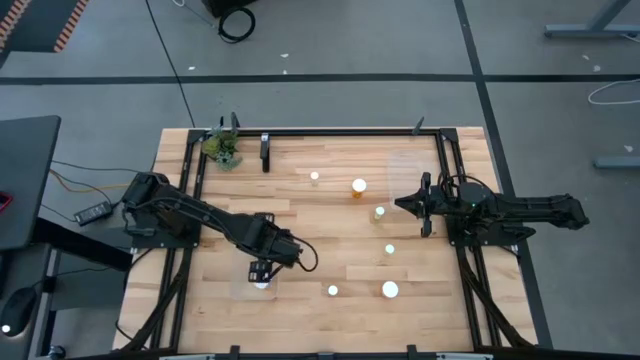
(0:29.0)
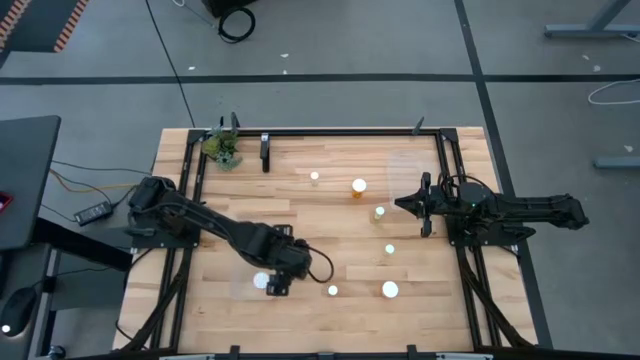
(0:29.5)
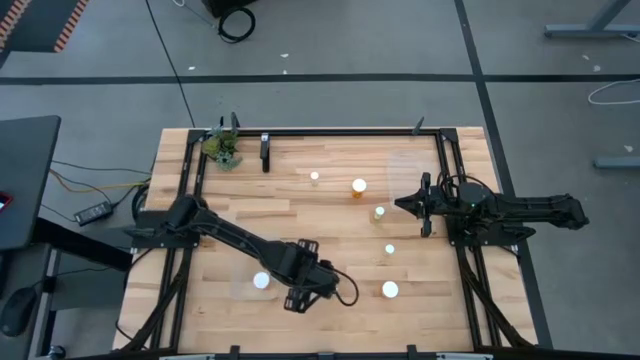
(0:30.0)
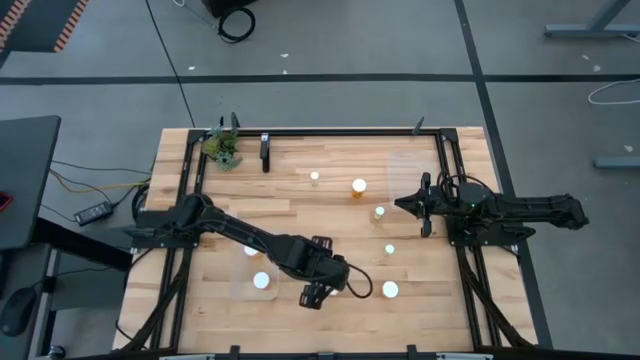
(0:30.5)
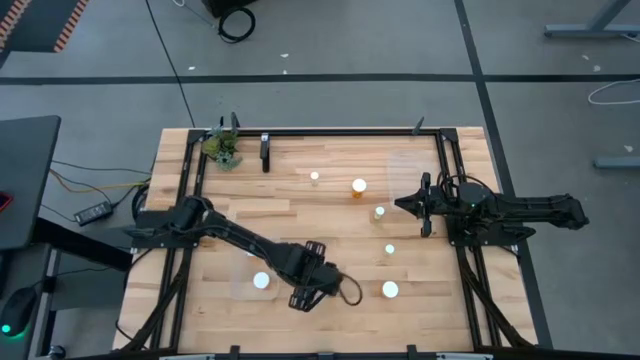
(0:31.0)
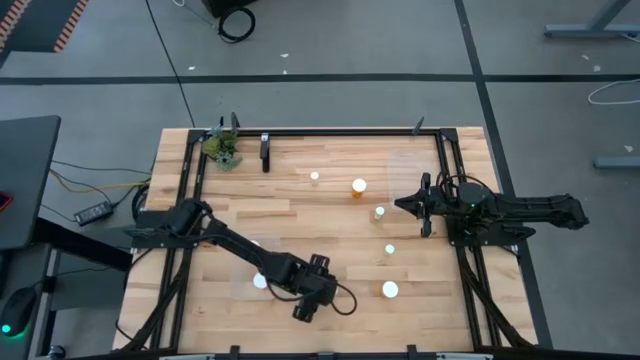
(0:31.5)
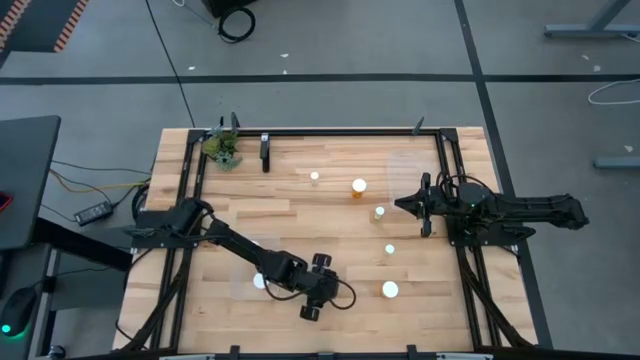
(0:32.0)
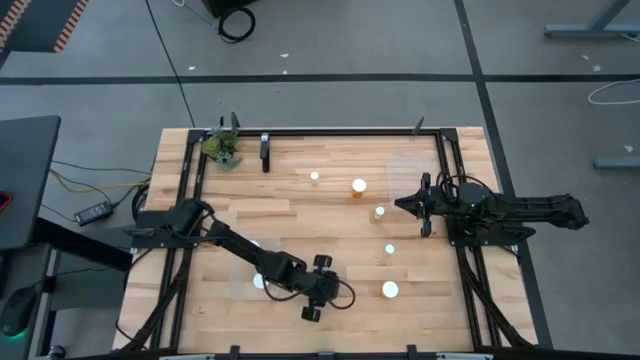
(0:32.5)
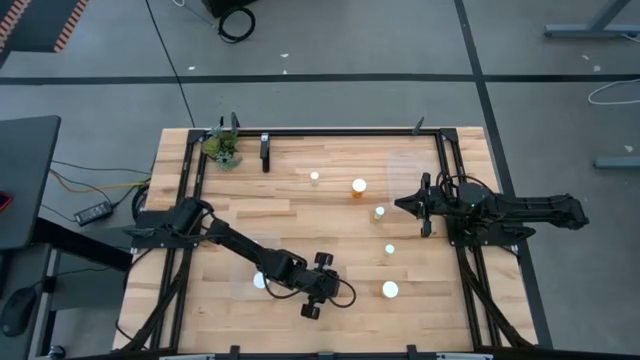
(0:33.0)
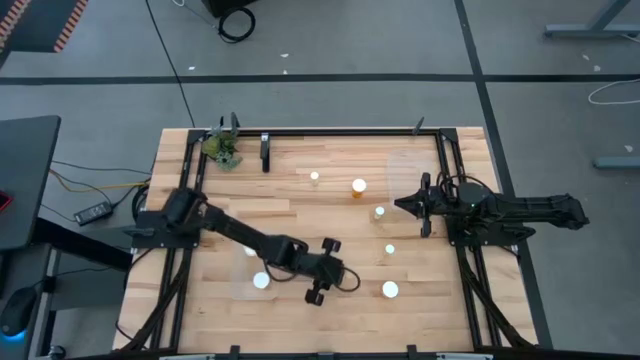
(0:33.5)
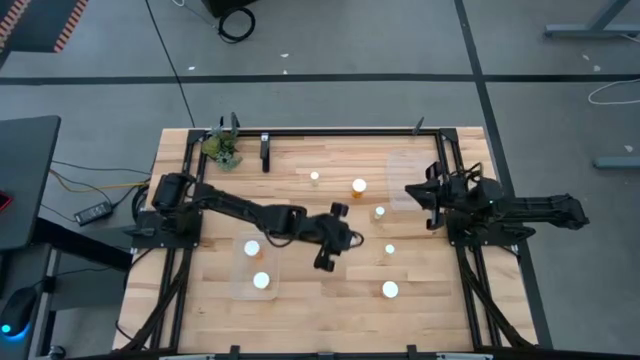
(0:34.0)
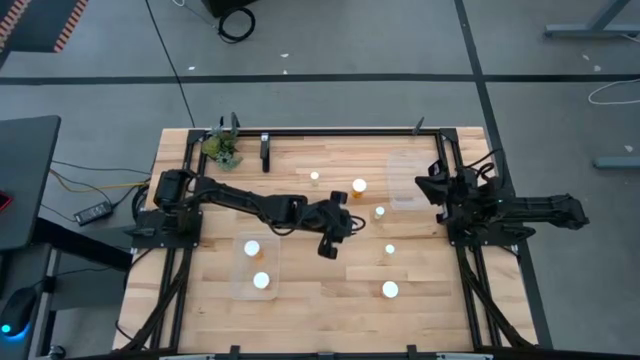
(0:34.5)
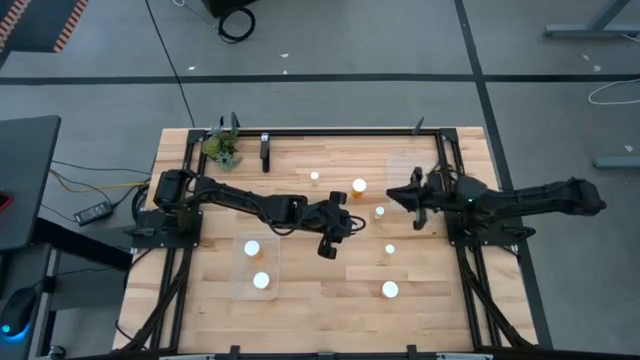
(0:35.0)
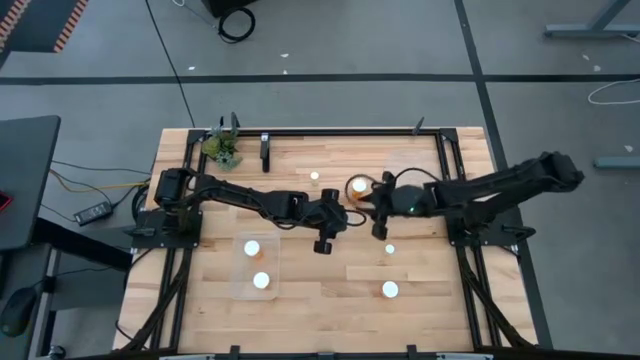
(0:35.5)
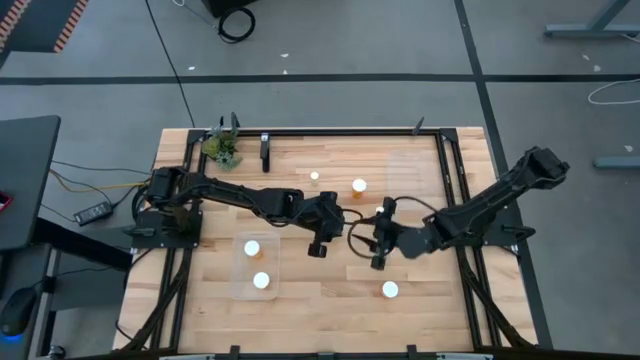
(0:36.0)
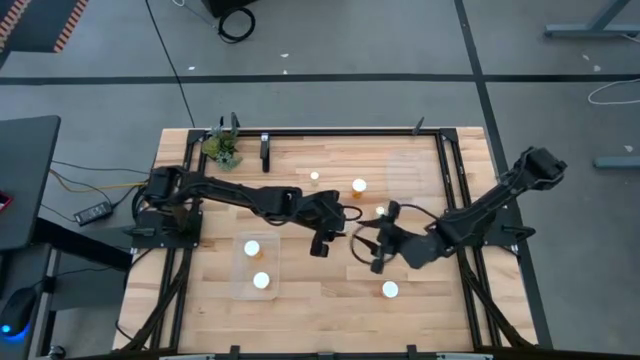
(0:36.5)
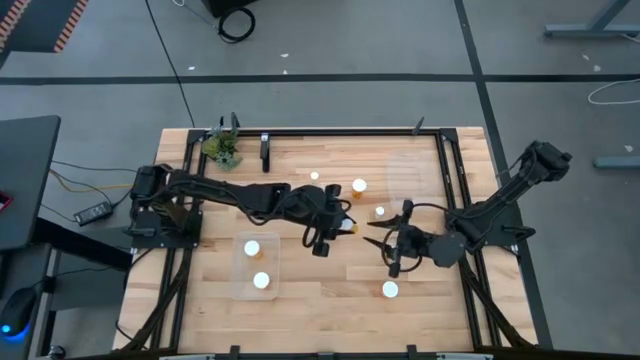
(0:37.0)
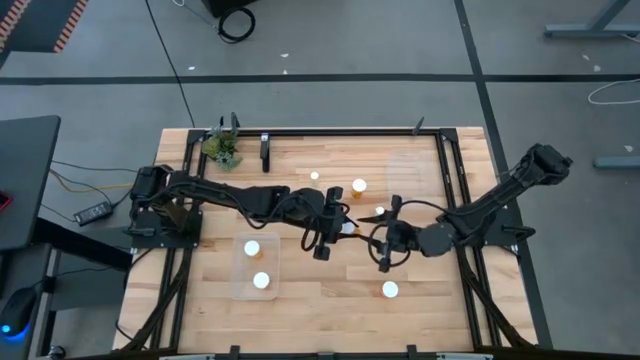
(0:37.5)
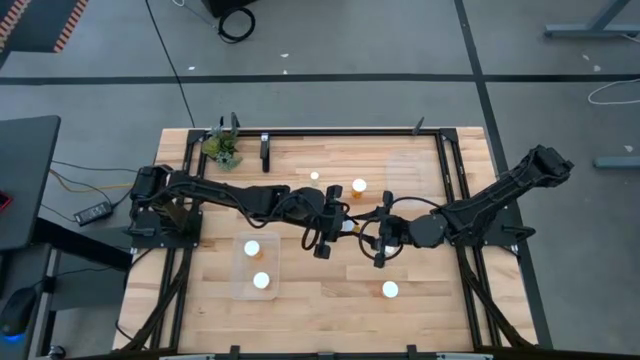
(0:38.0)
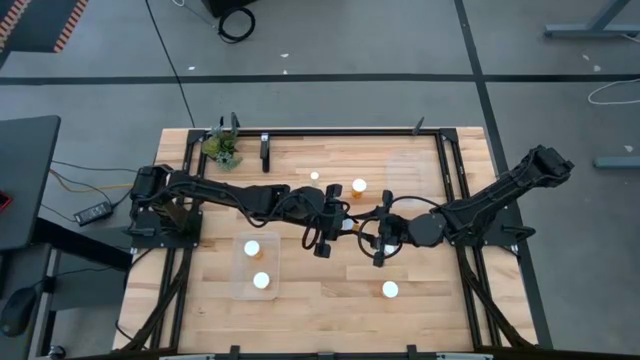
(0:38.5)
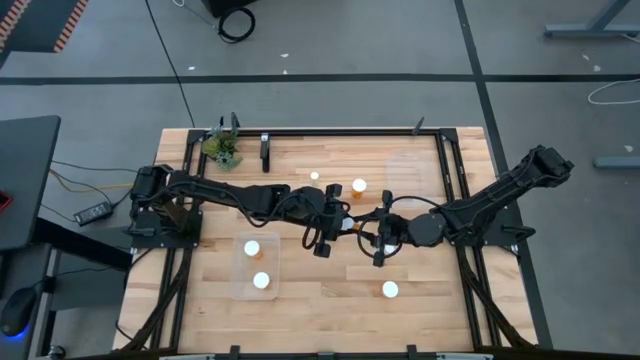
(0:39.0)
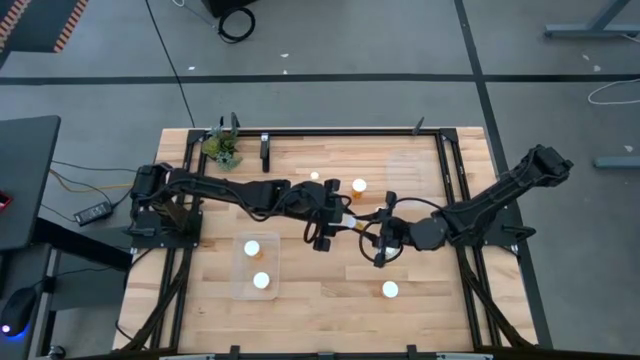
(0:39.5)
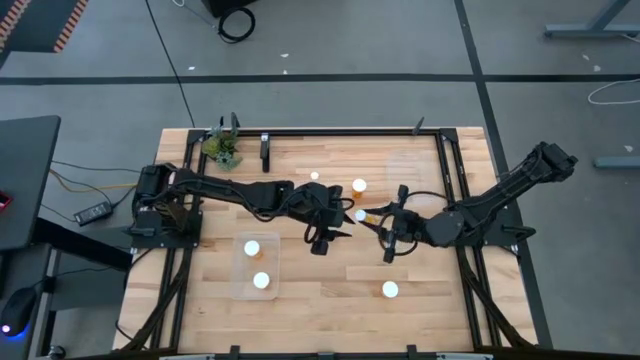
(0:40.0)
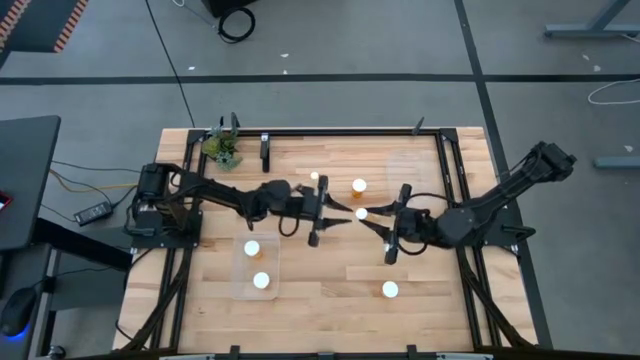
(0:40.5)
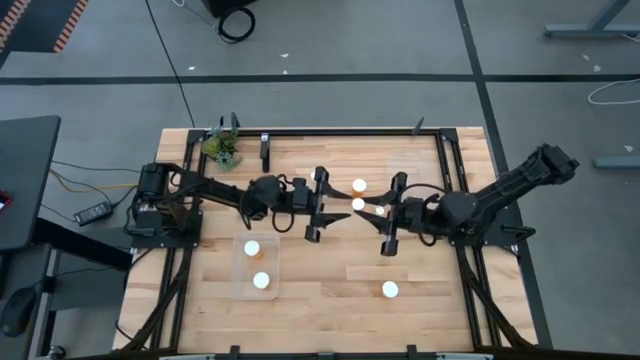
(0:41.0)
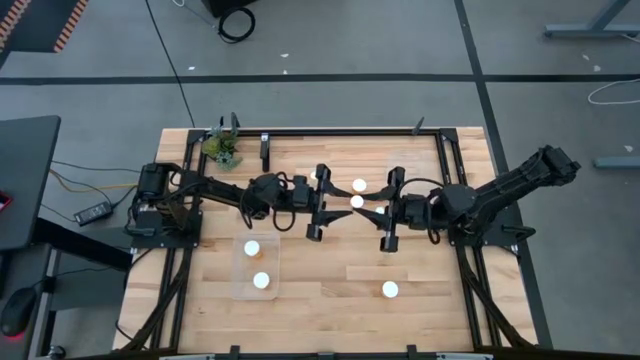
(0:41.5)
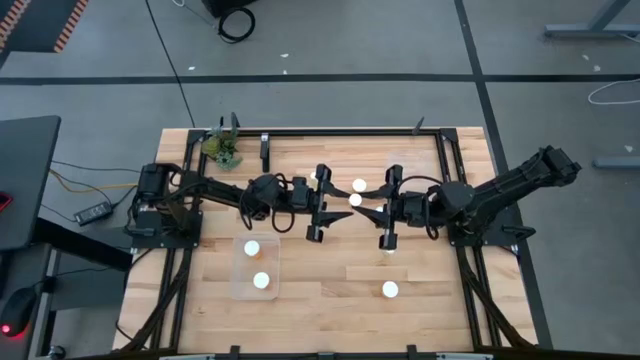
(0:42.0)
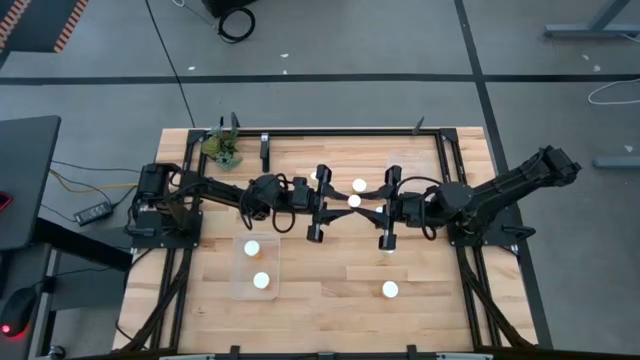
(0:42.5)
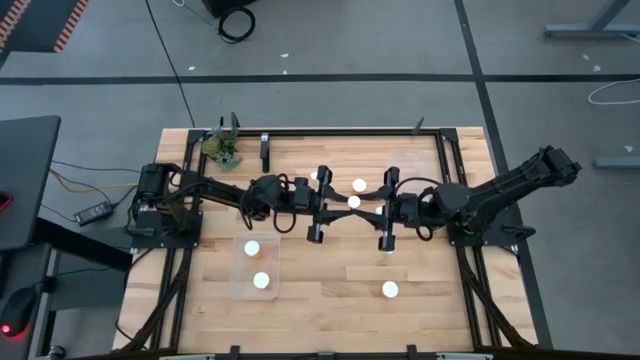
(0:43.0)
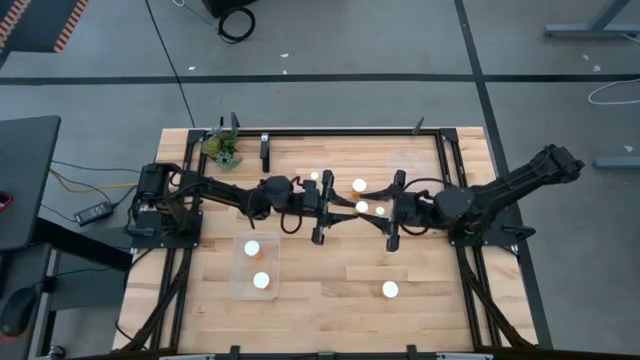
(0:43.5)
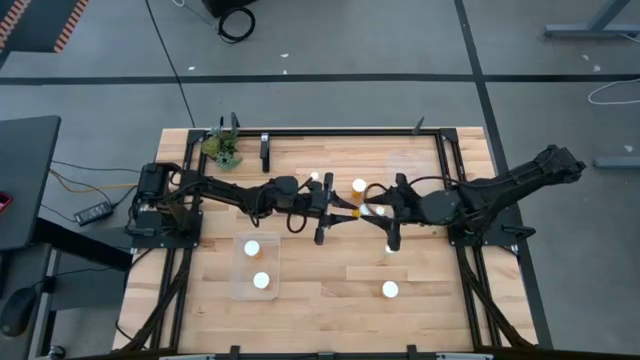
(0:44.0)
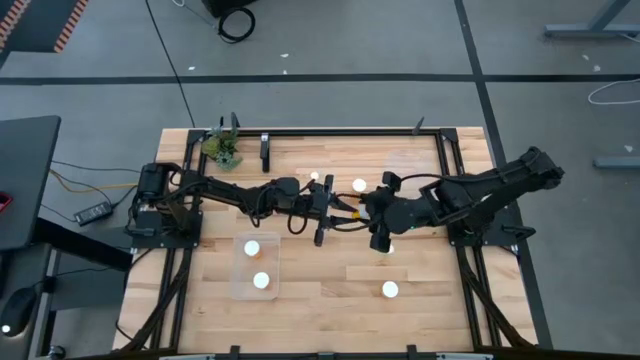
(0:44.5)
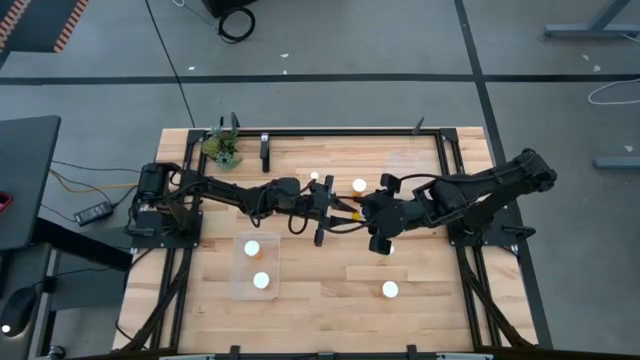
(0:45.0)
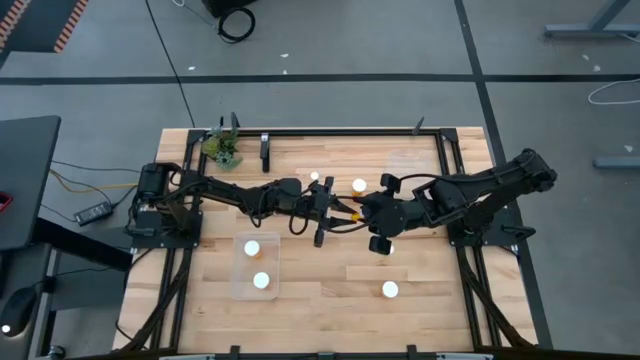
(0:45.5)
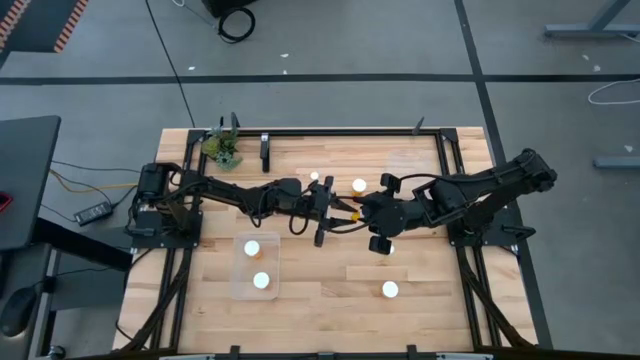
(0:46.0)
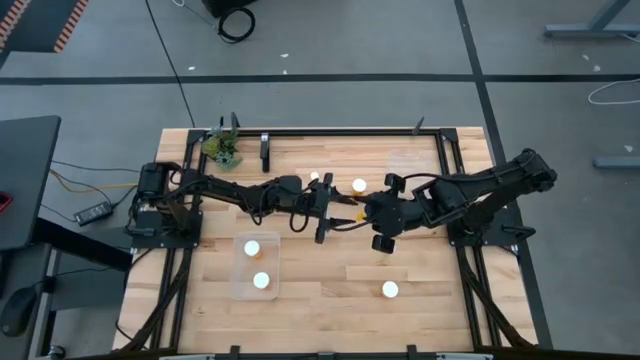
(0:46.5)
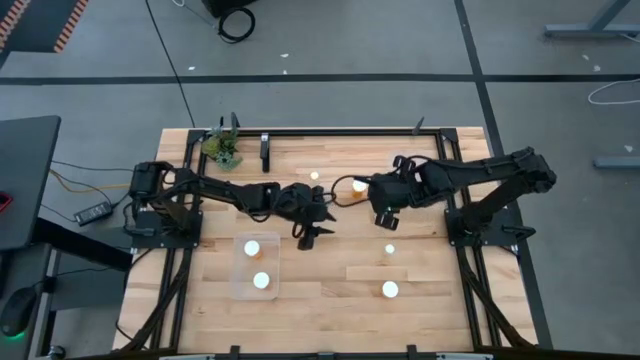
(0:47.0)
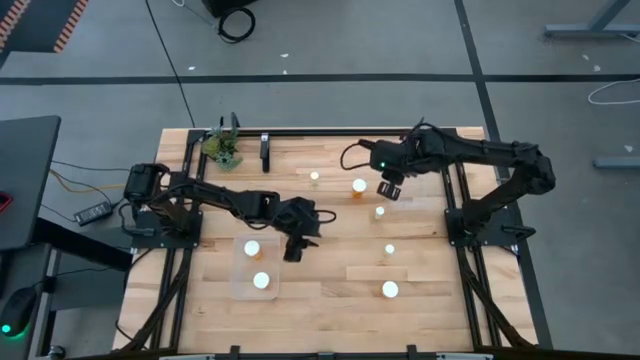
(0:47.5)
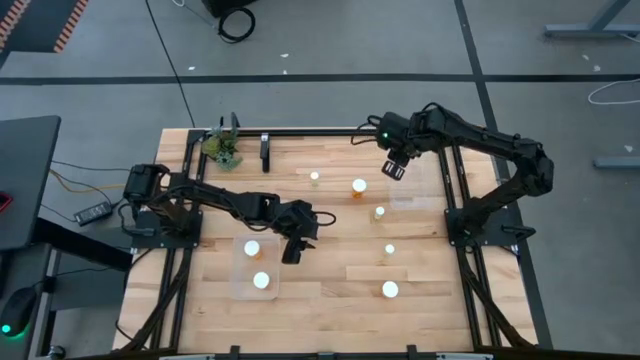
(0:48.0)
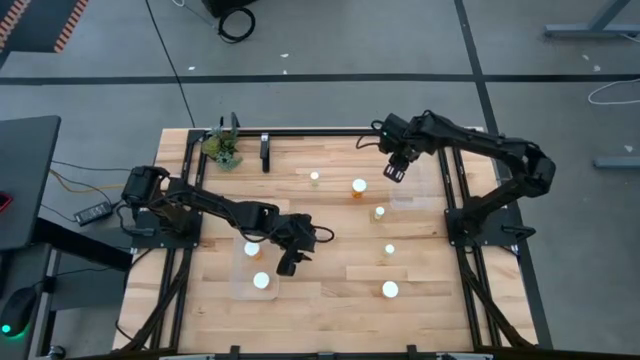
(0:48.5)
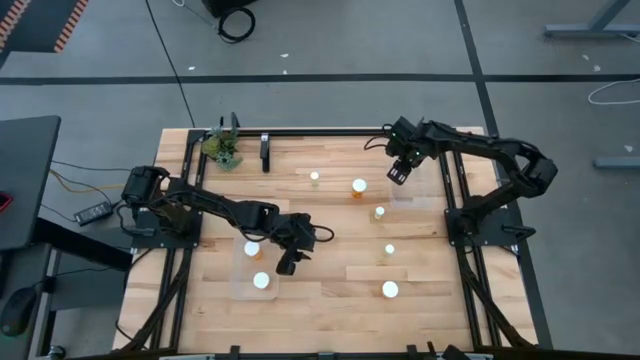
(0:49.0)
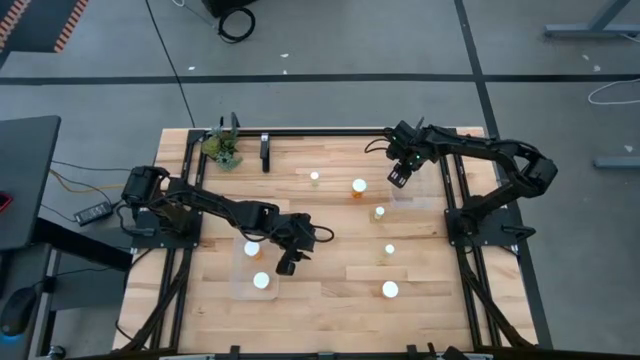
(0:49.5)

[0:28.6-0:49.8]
Task: Pick and place medicine bottles into bin by pill shape (circle, oval)
Put the small orange pill bottle into the top transparent bin
